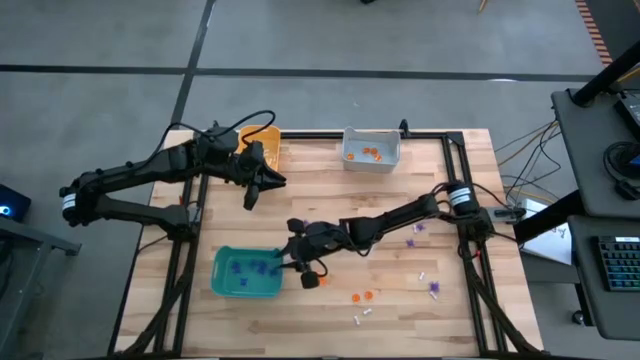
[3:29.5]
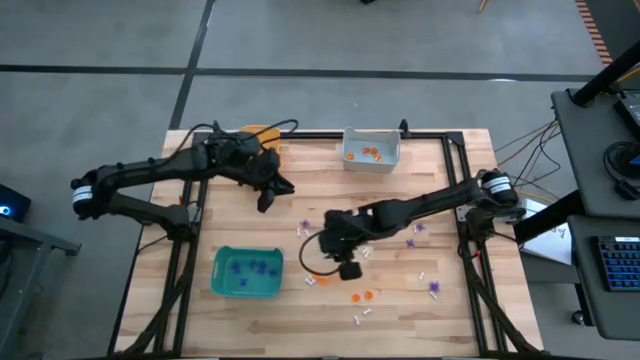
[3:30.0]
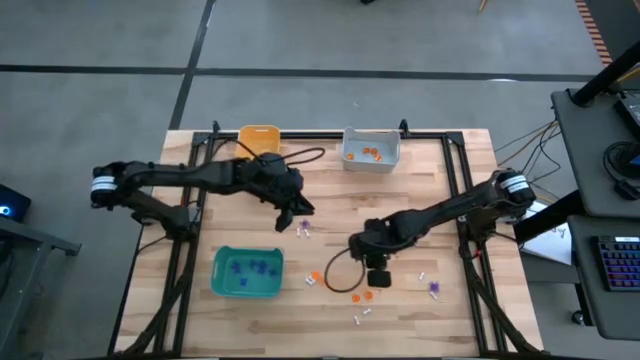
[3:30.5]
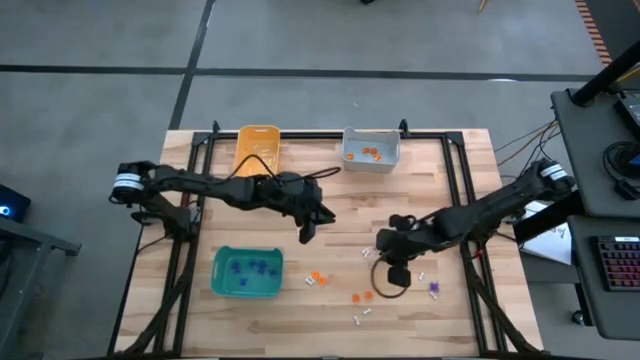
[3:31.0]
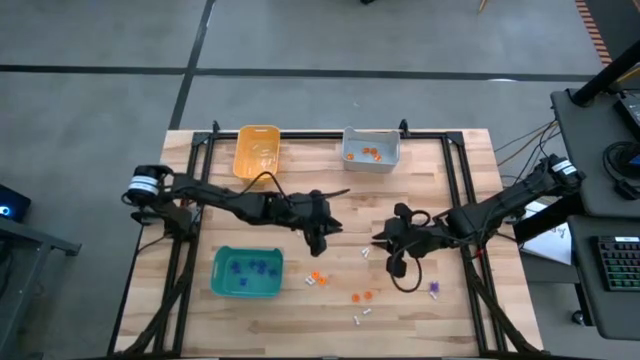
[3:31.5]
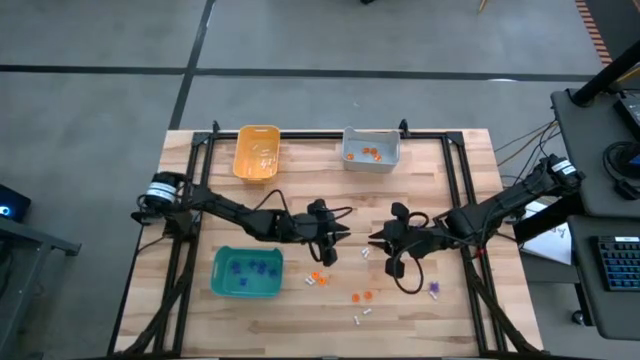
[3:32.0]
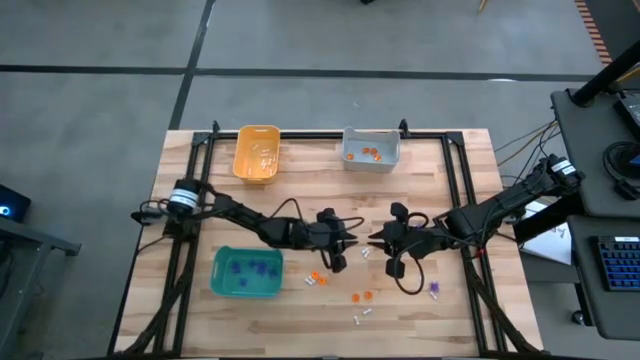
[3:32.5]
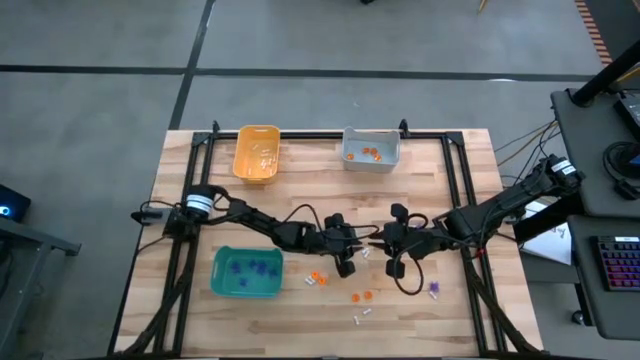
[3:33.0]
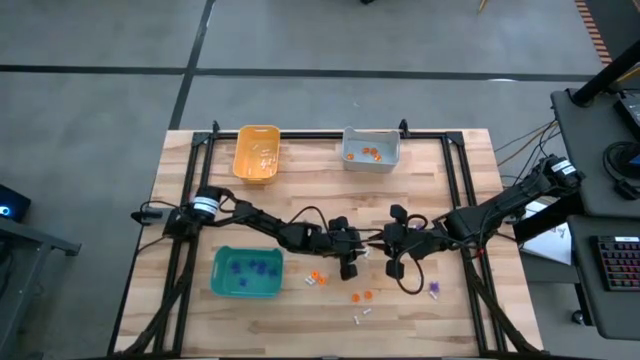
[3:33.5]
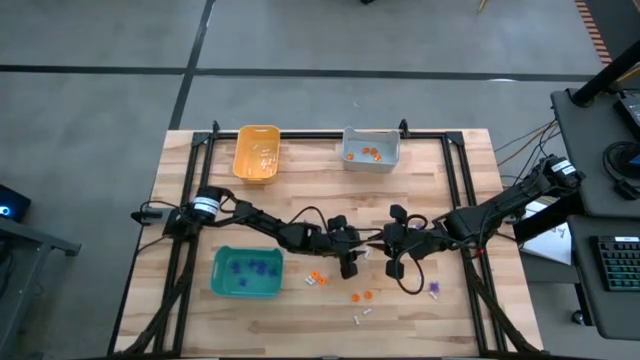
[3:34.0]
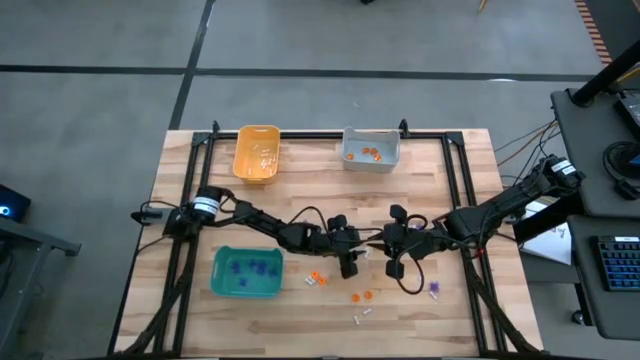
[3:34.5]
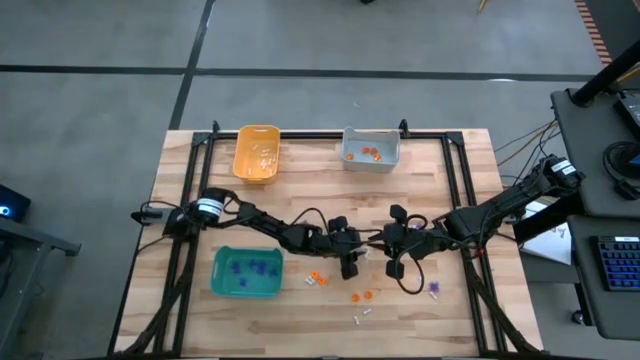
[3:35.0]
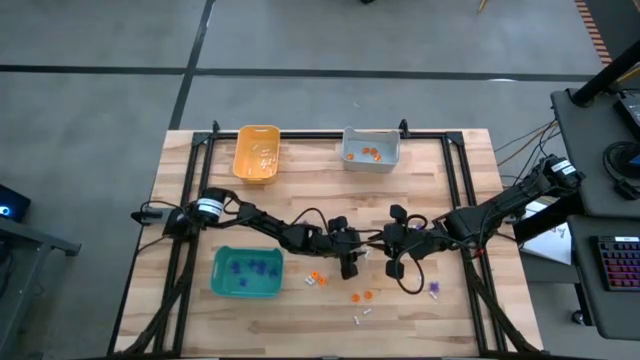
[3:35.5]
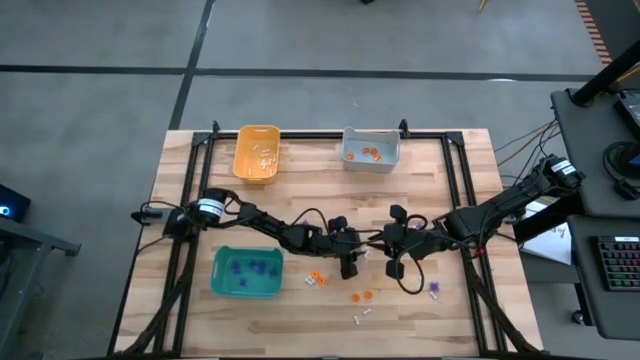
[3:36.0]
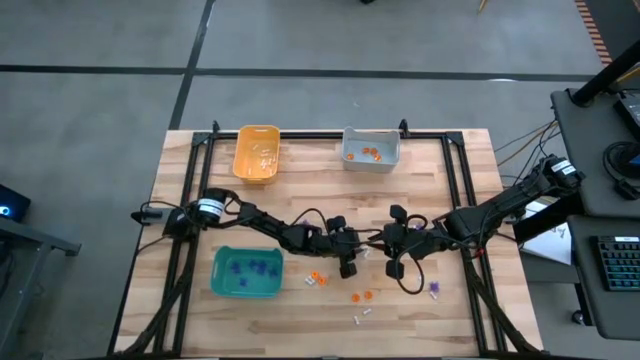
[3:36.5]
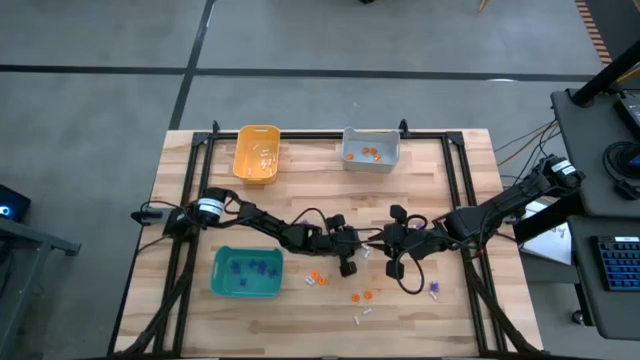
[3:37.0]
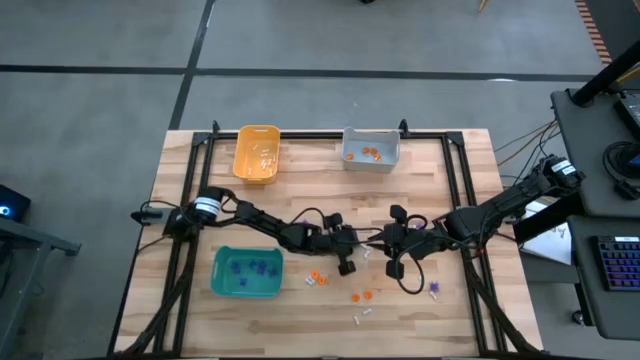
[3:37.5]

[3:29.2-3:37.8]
Task: Sort Halloween decoration
Put the white bone toy into the orange bin

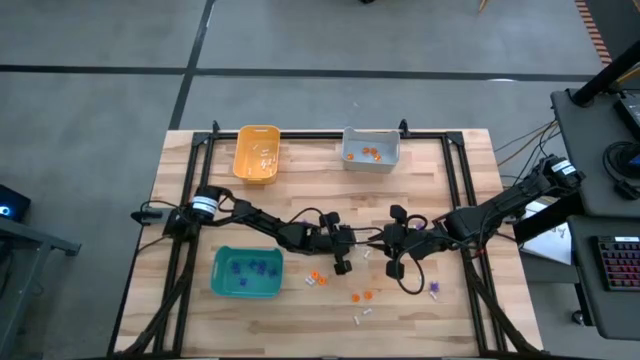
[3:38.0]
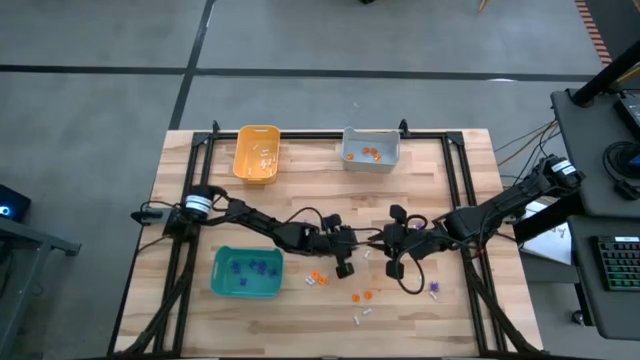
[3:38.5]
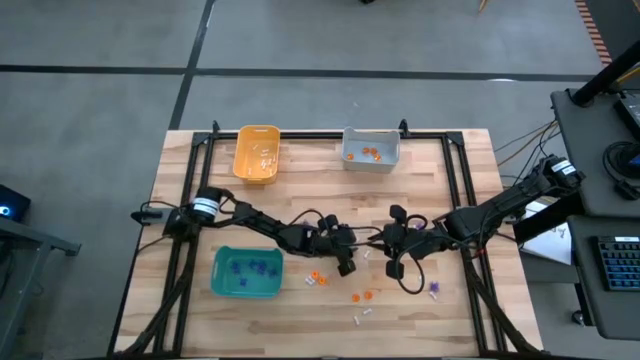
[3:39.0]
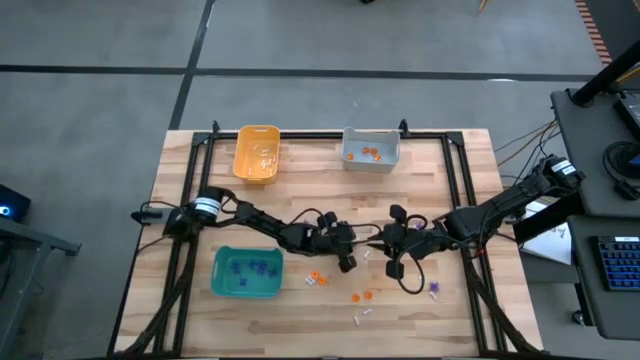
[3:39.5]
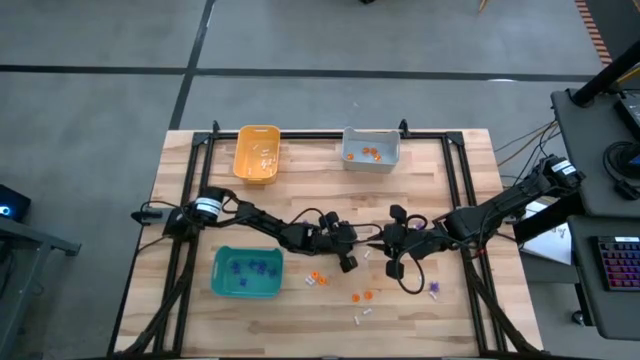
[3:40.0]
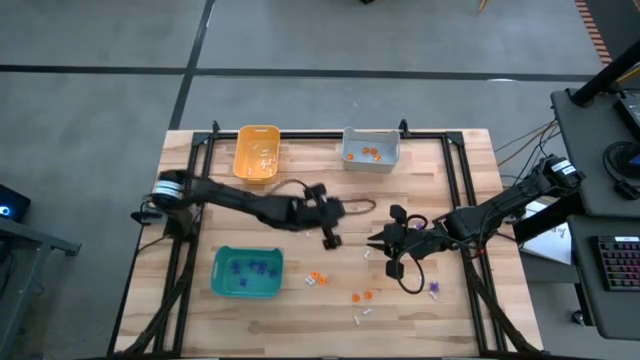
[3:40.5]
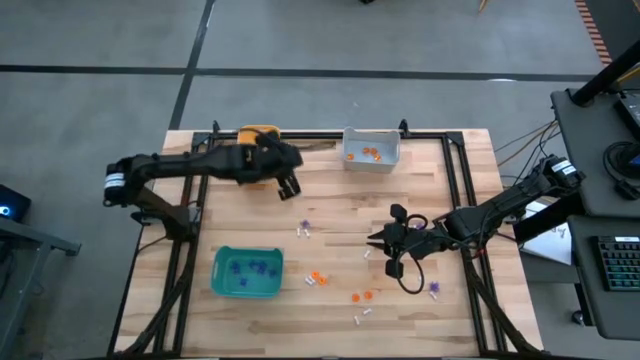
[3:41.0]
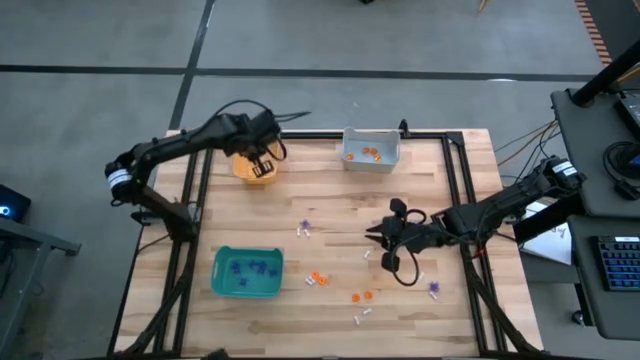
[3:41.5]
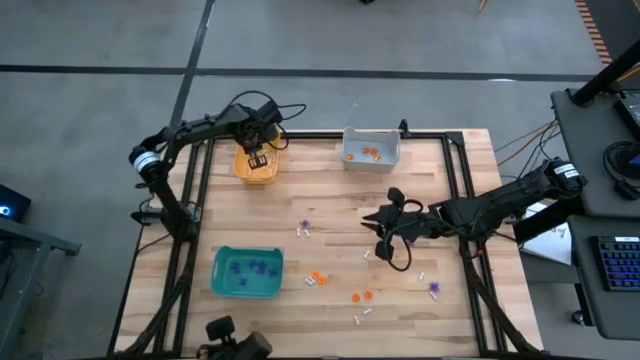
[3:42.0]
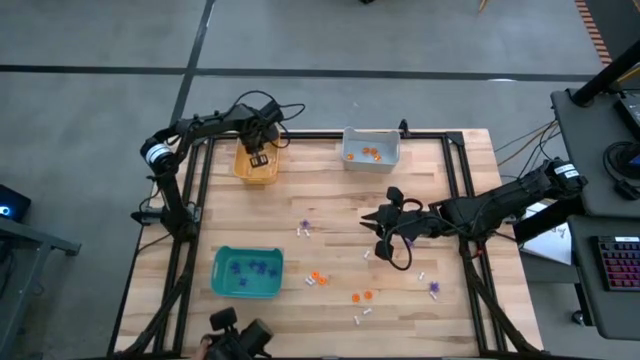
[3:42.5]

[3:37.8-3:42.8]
Put the white bone toy into the orange bin

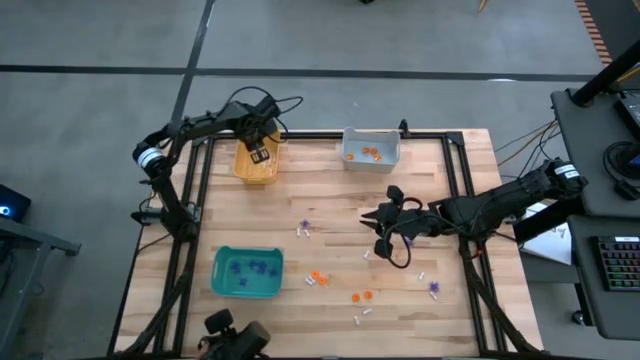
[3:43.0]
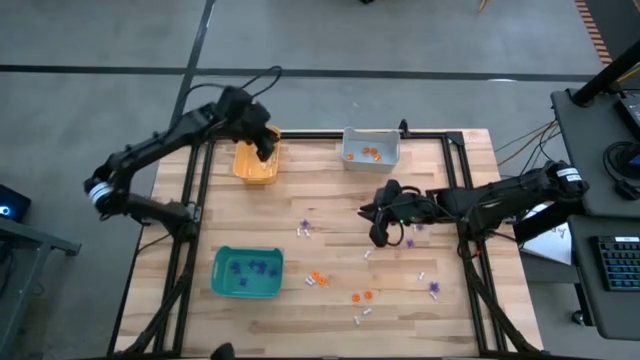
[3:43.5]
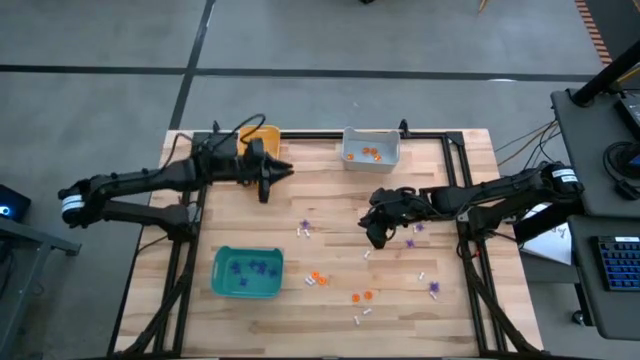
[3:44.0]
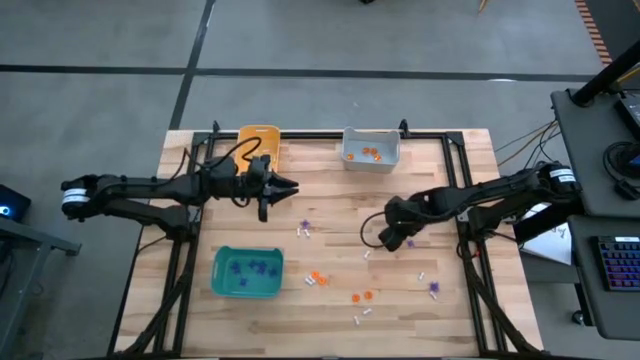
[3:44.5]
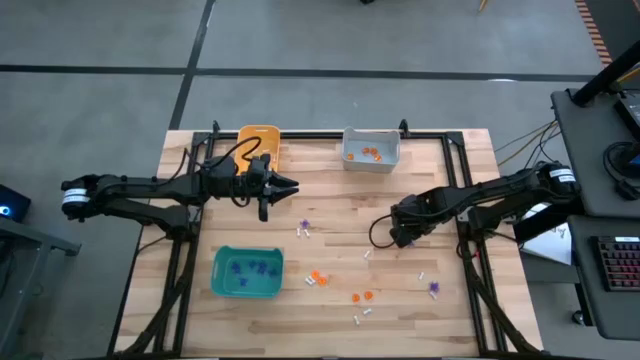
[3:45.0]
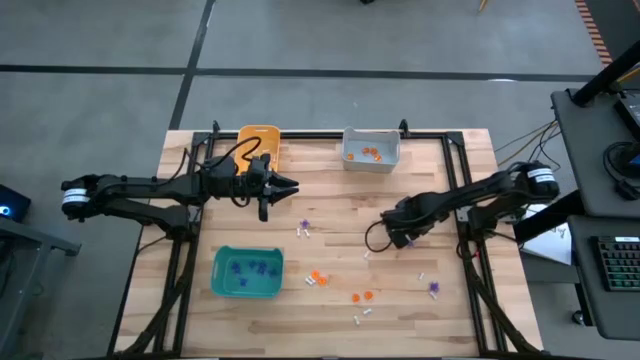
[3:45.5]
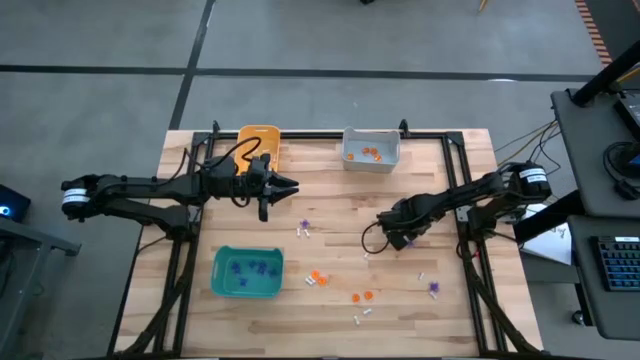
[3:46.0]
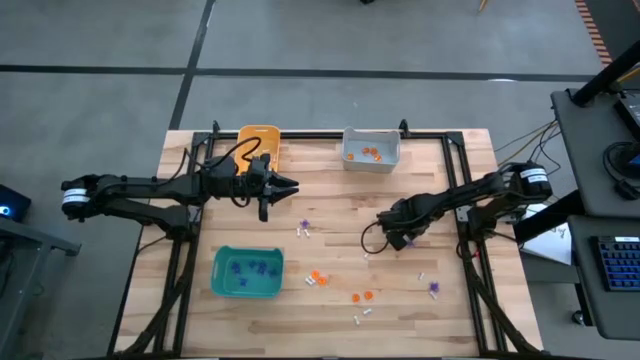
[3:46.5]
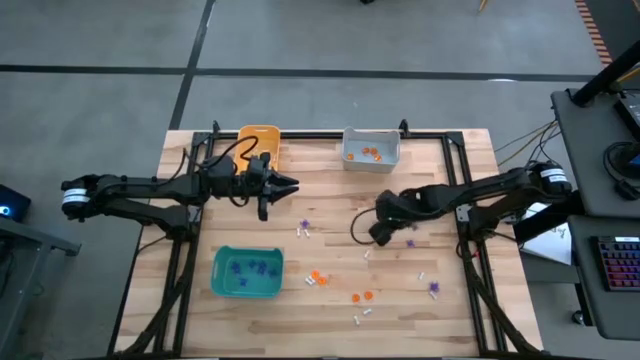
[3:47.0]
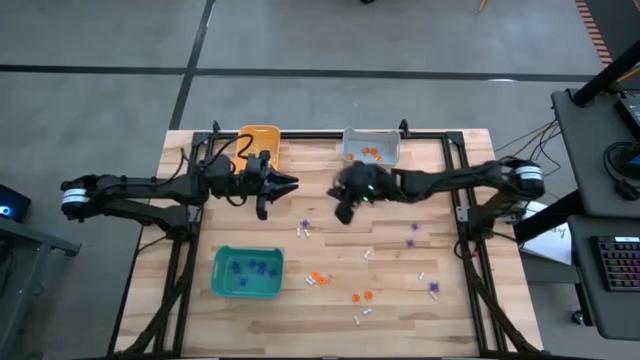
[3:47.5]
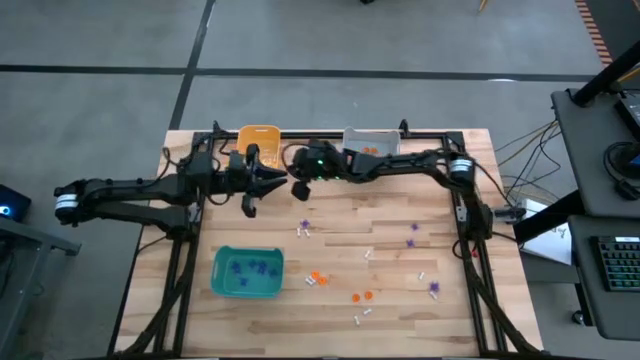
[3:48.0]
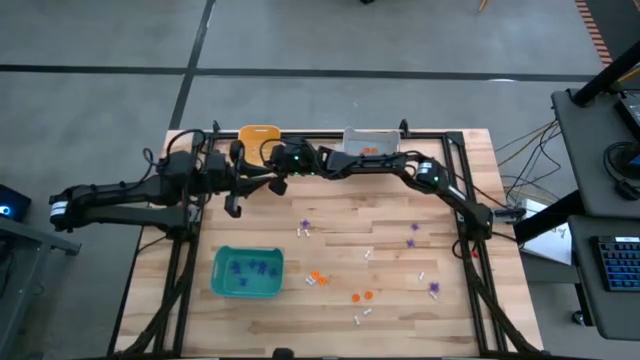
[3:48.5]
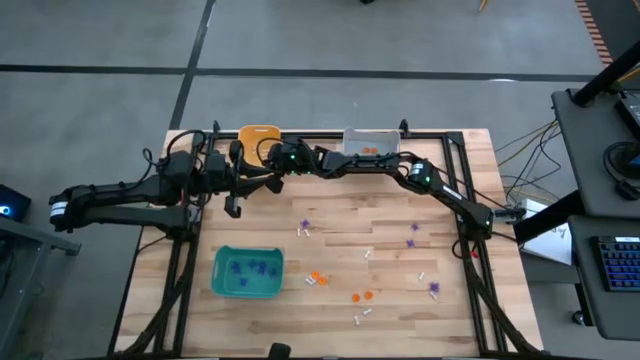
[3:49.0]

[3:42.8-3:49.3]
Put the white bone toy into the orange bin
